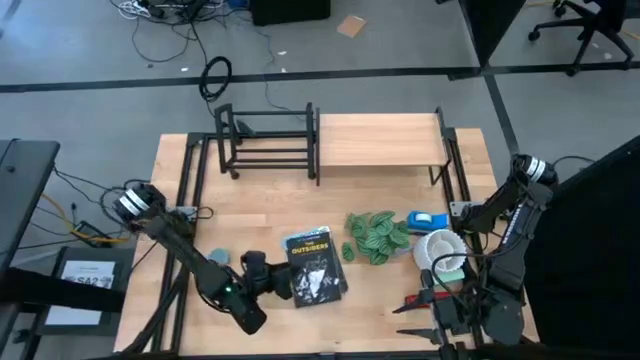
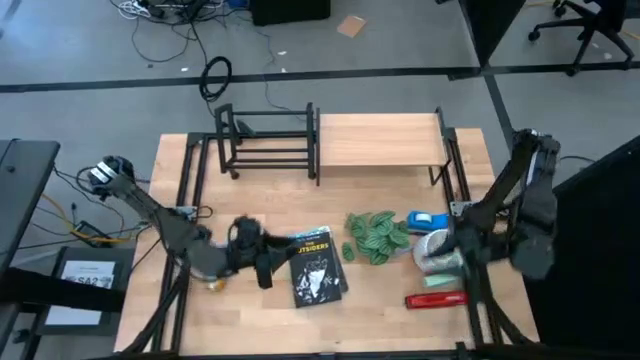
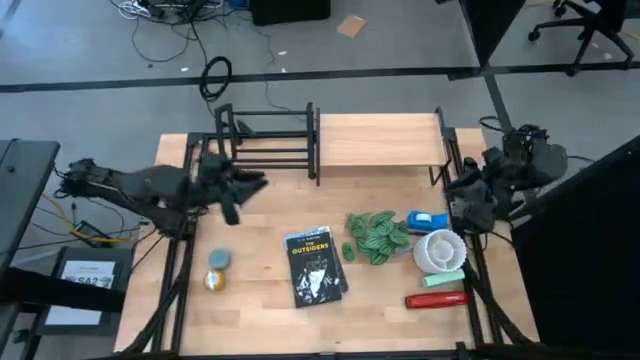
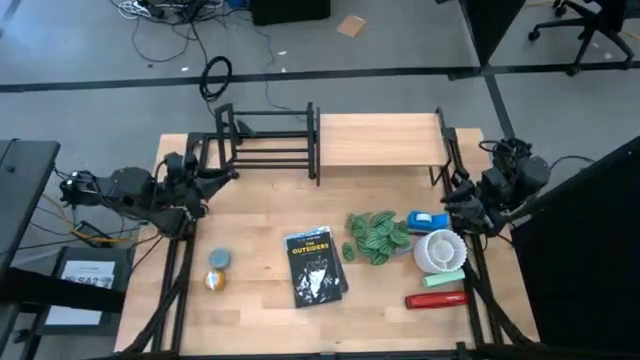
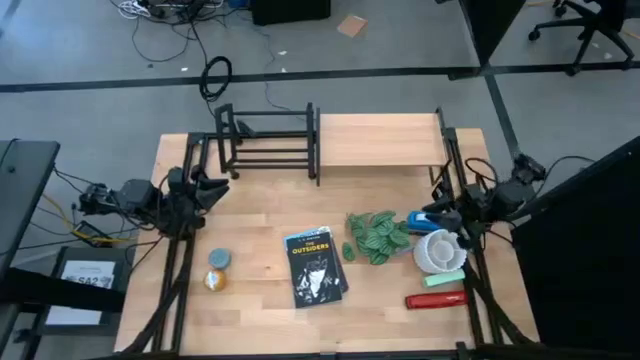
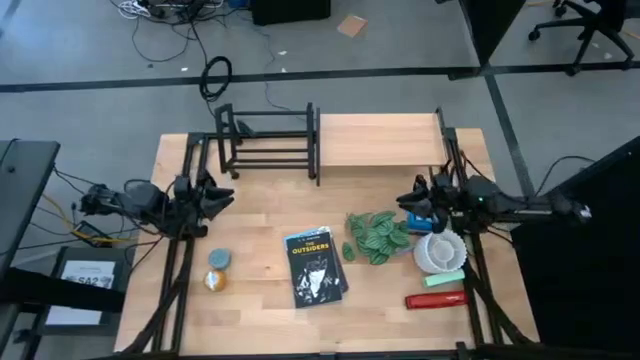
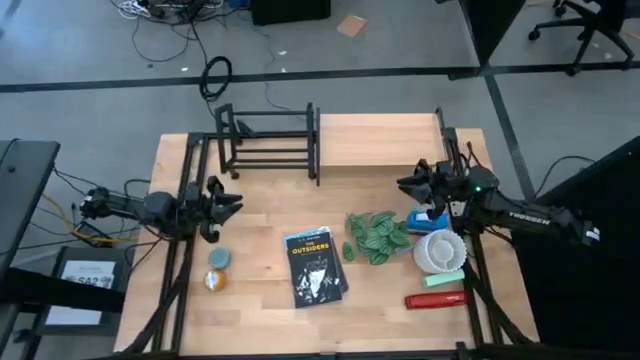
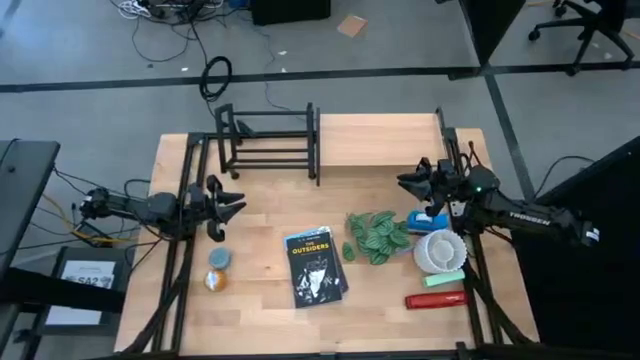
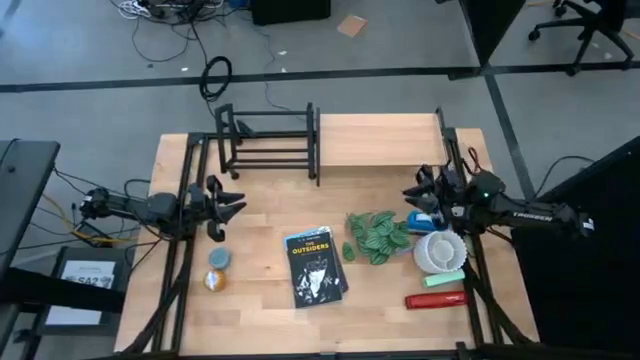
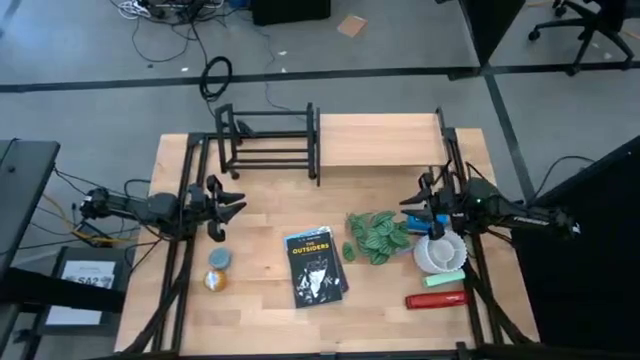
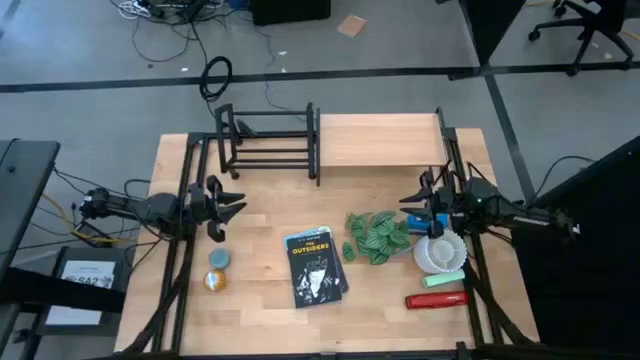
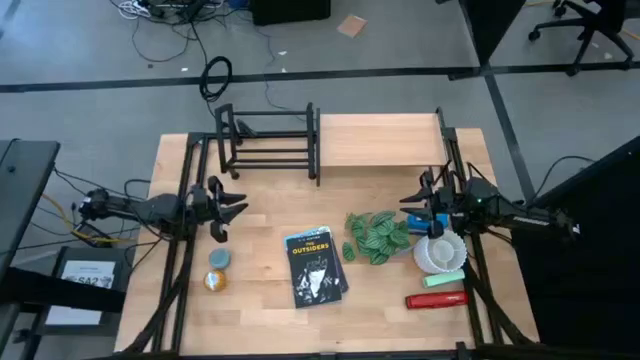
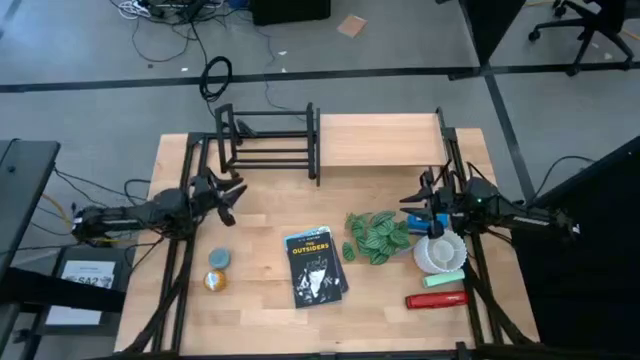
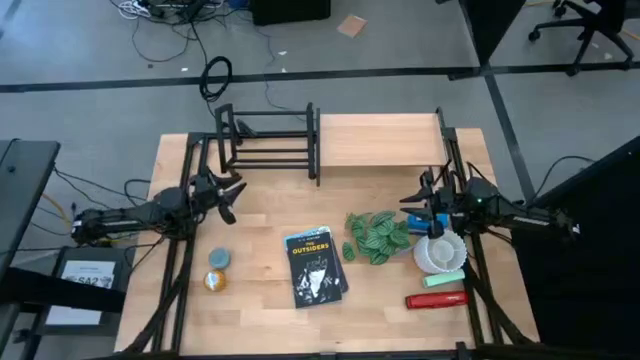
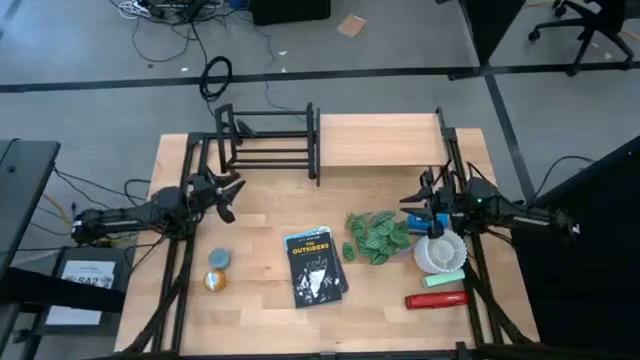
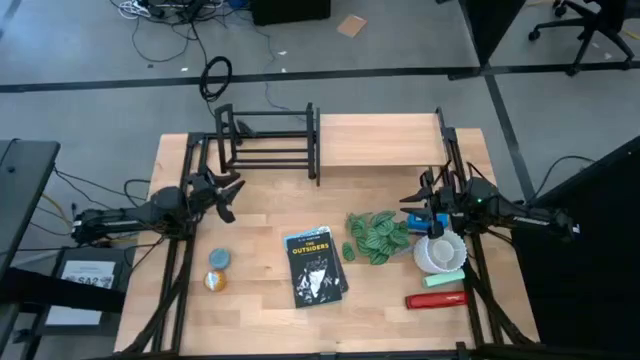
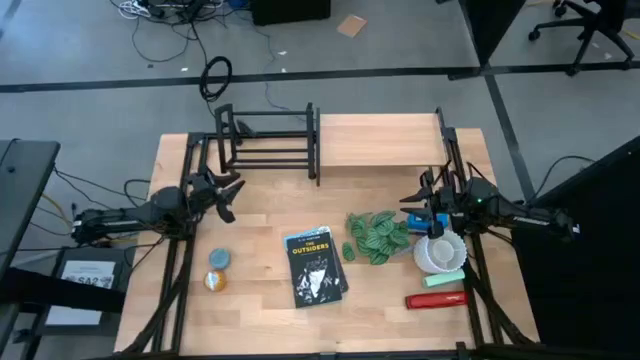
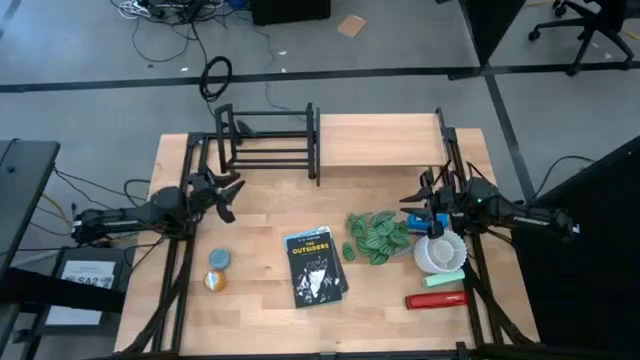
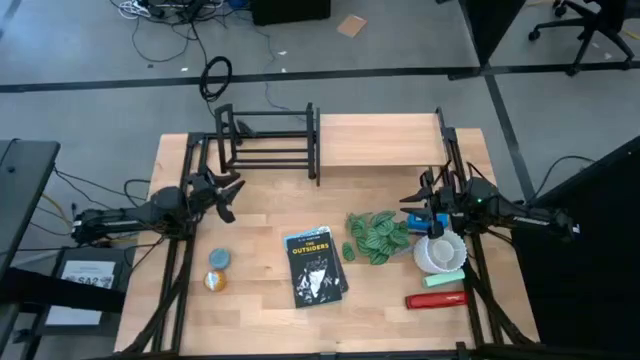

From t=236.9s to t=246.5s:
Task: Stock shelves
Return to Home Position

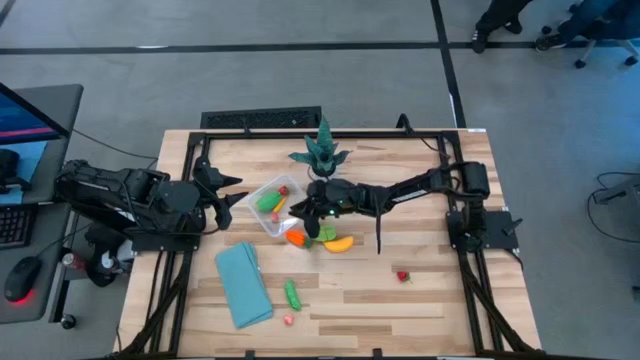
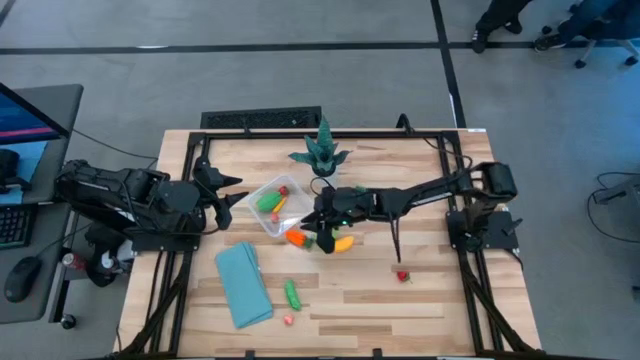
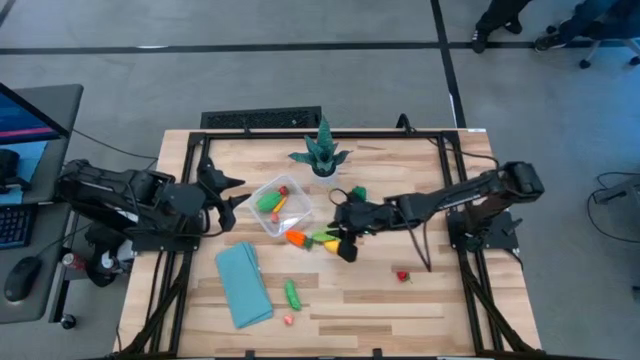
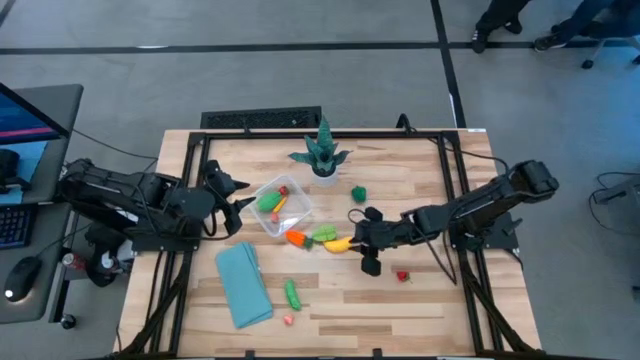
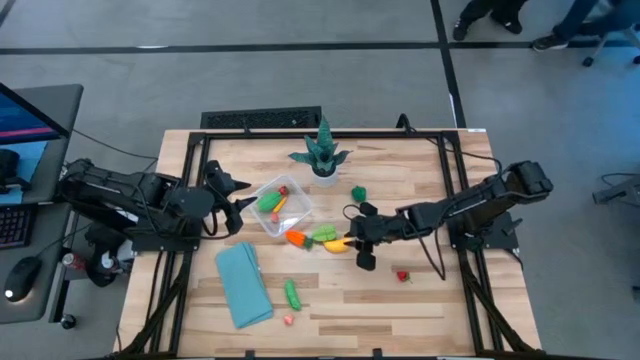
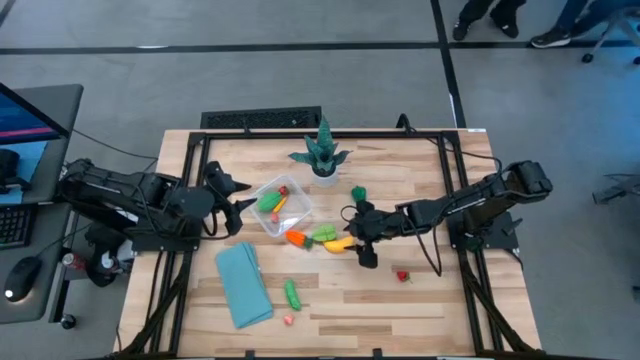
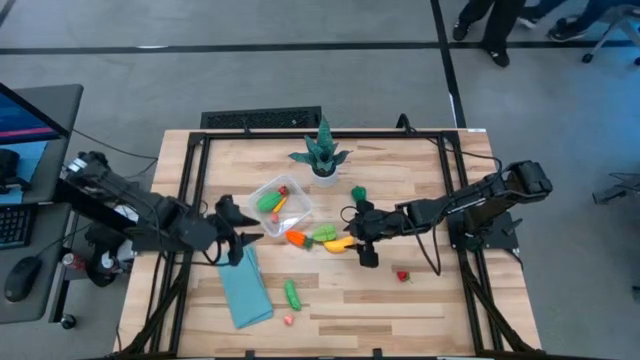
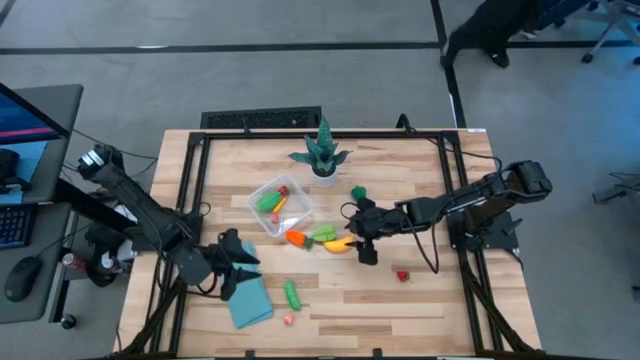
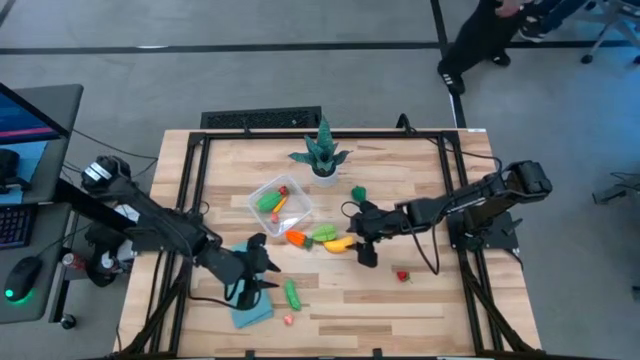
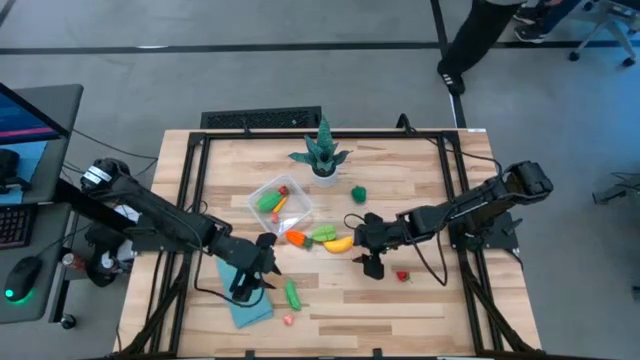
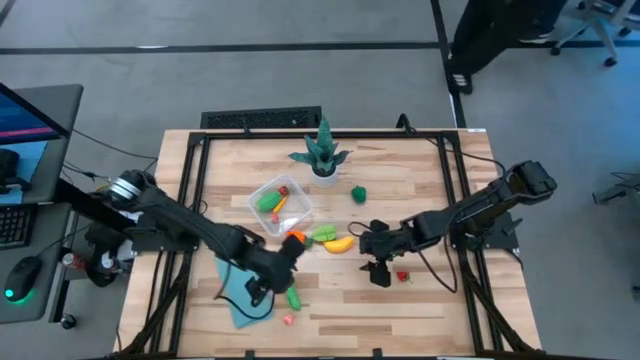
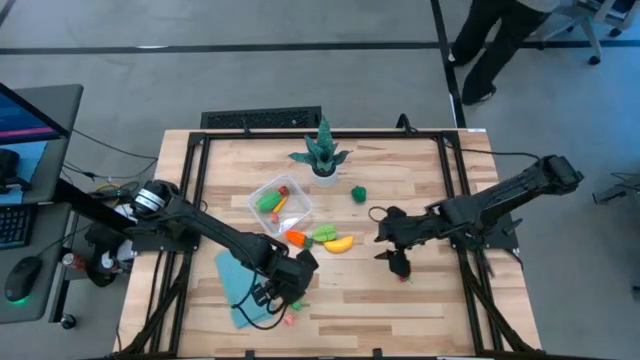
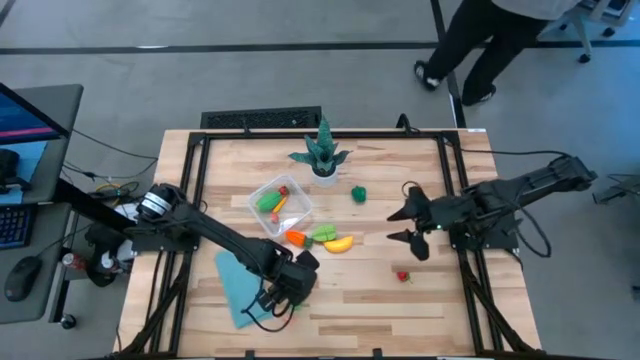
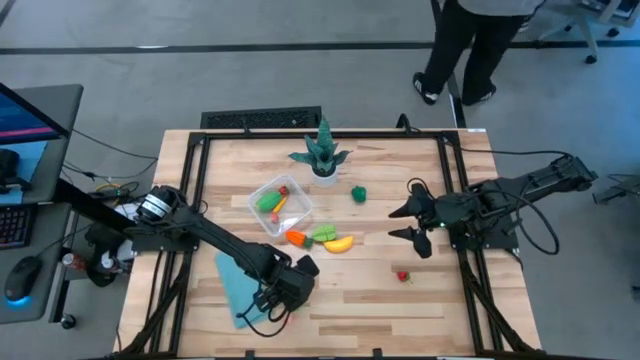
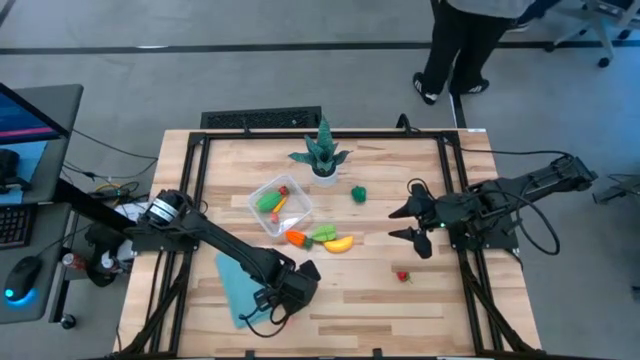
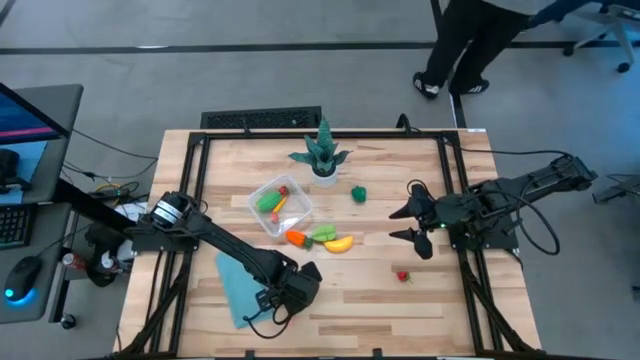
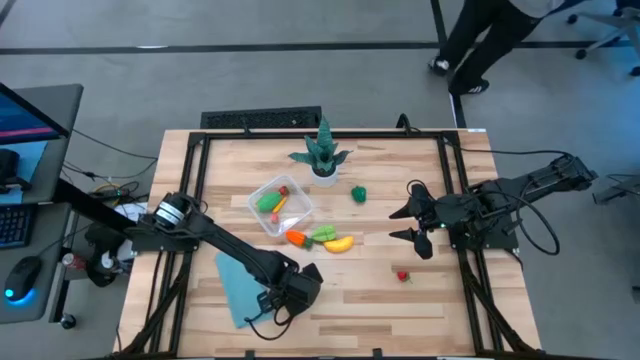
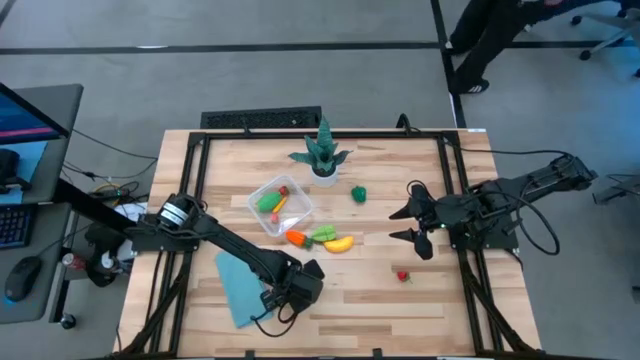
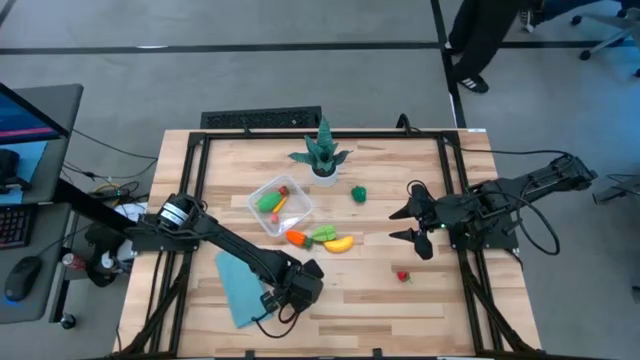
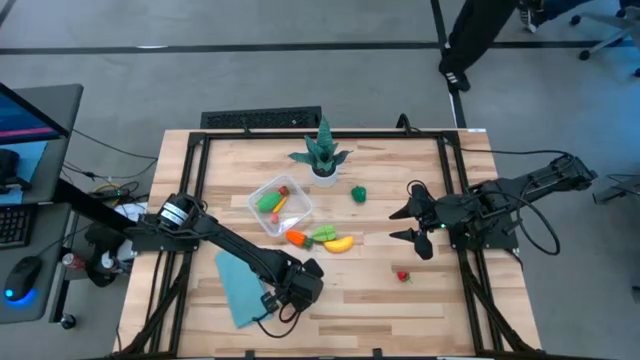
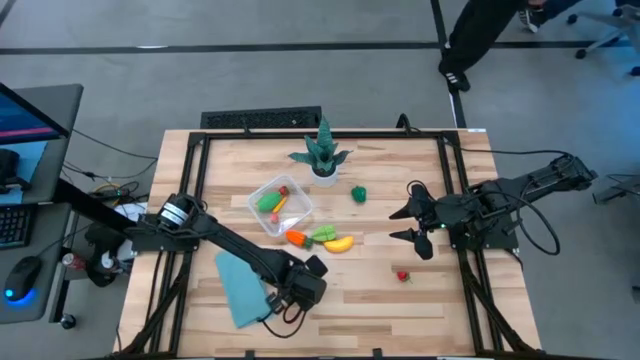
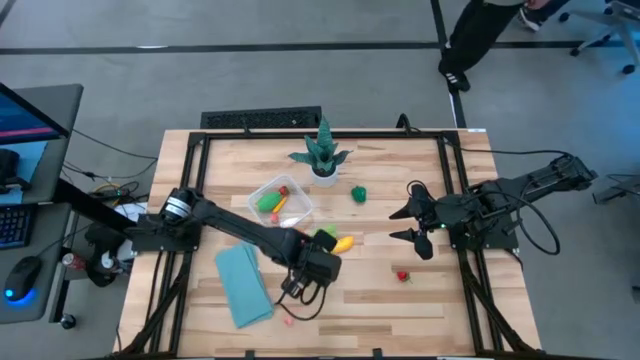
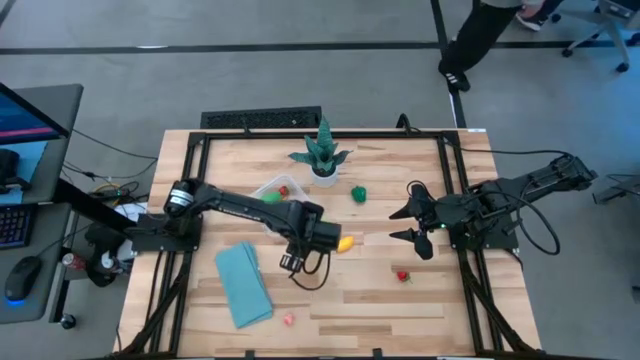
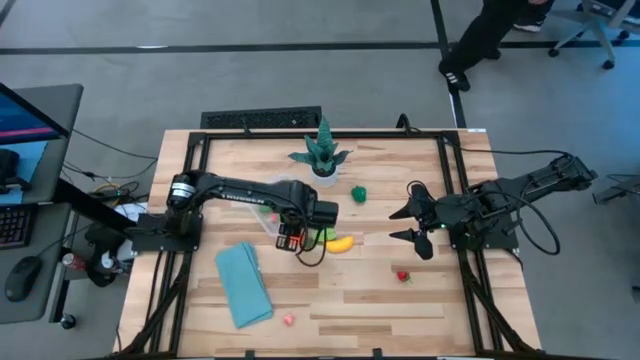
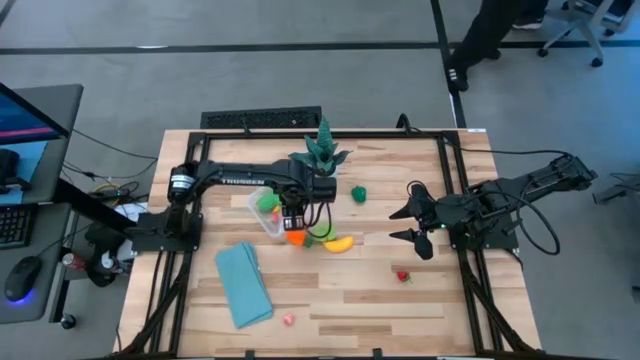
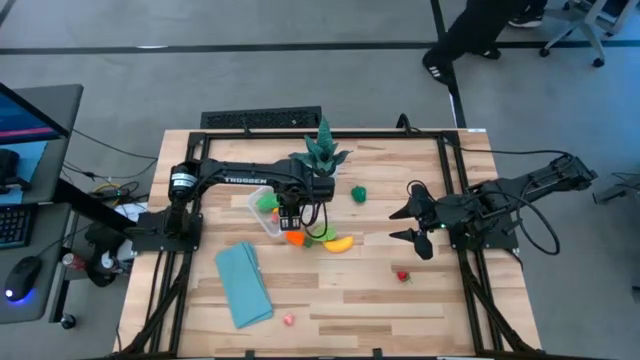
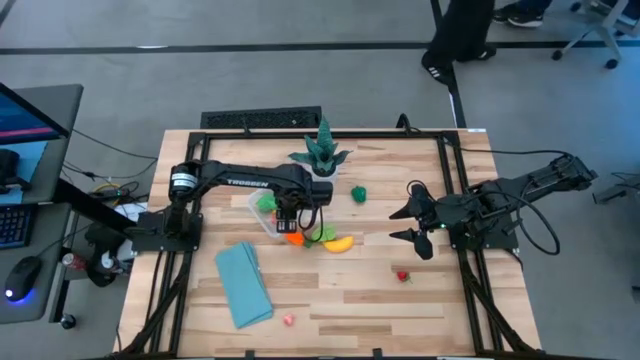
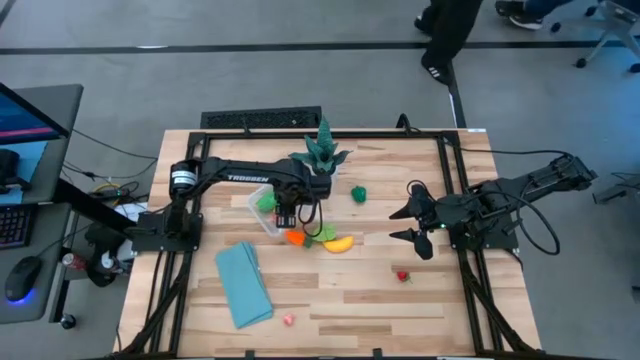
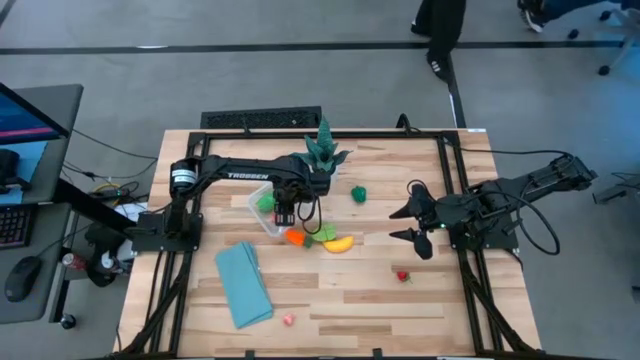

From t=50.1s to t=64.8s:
Task: Pick and placing Produce into tupperware
Put the green peas into the transparent container
